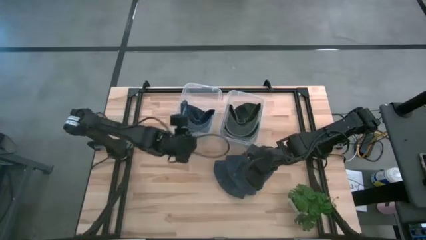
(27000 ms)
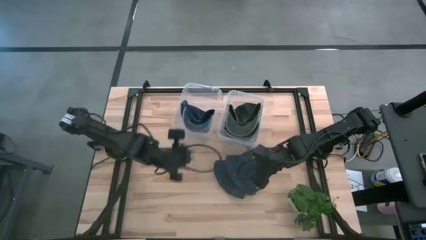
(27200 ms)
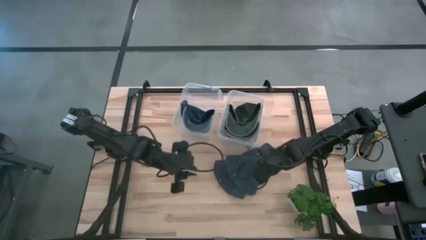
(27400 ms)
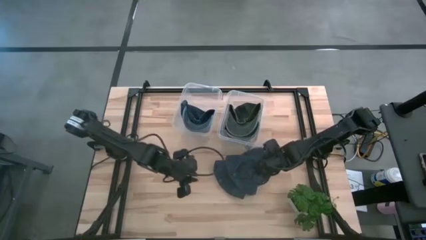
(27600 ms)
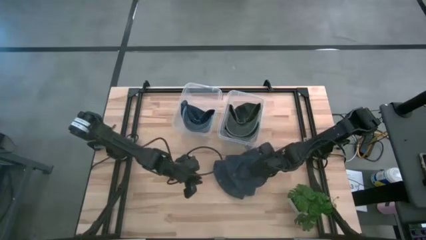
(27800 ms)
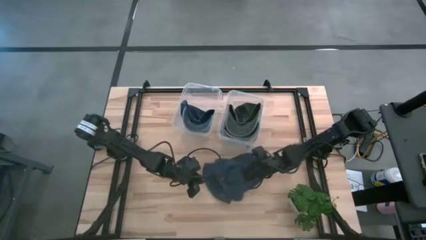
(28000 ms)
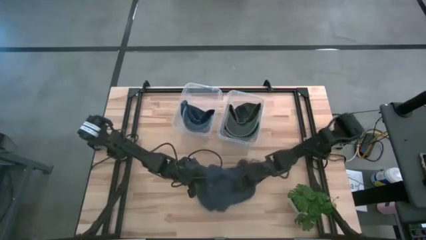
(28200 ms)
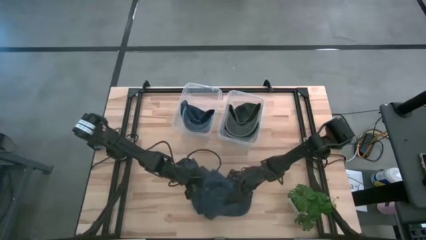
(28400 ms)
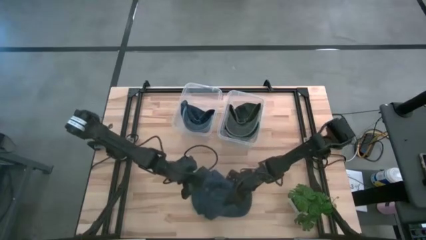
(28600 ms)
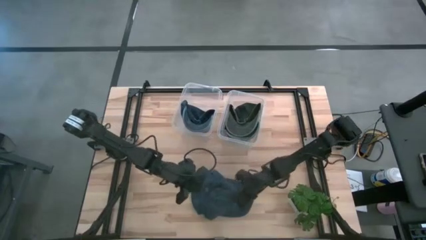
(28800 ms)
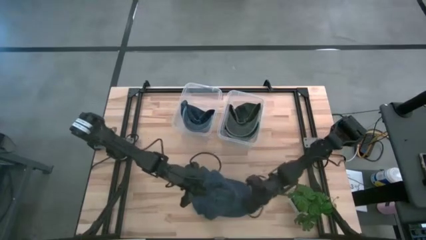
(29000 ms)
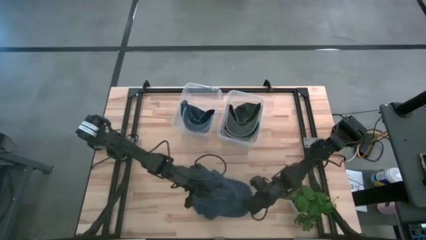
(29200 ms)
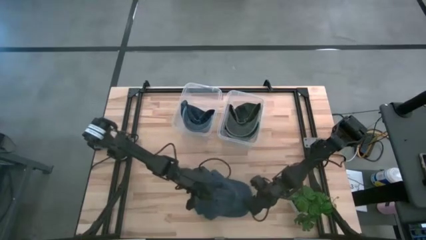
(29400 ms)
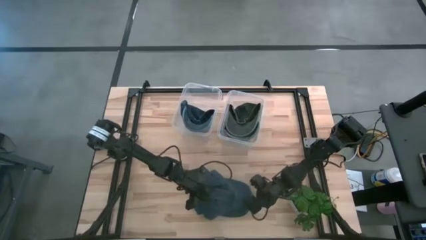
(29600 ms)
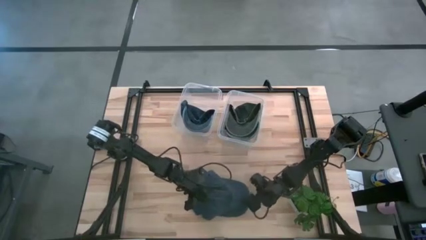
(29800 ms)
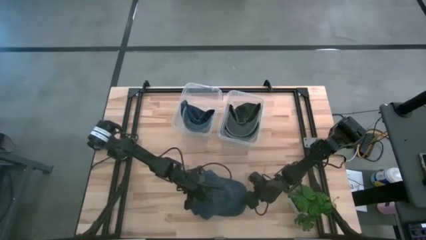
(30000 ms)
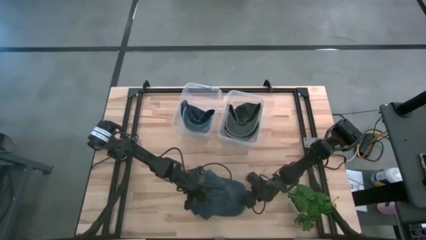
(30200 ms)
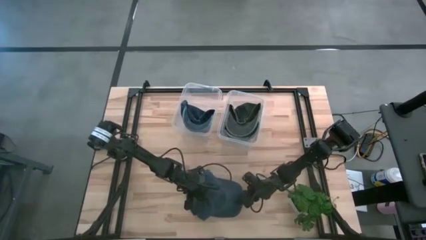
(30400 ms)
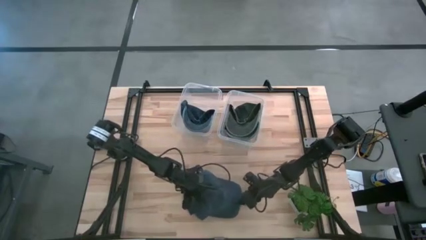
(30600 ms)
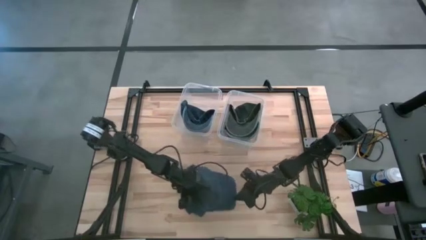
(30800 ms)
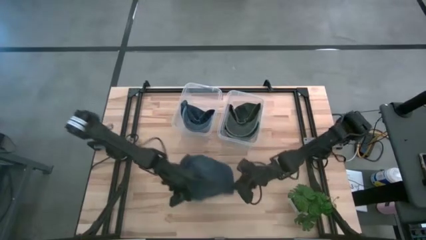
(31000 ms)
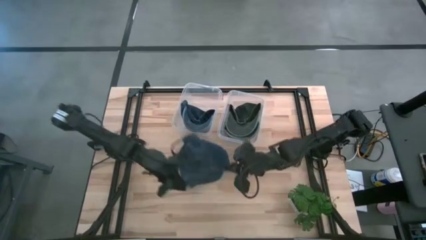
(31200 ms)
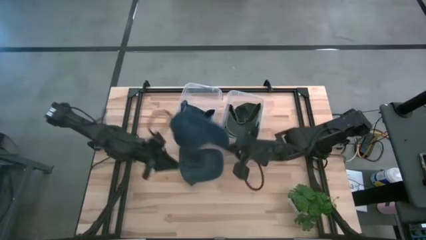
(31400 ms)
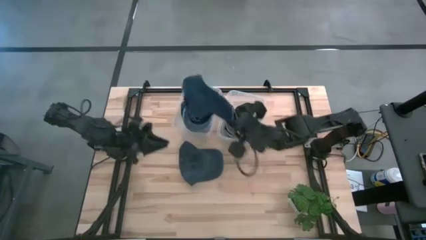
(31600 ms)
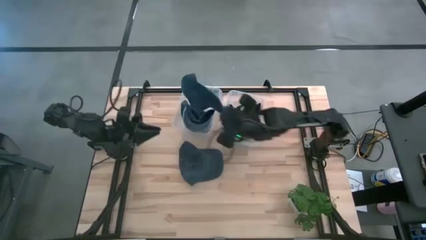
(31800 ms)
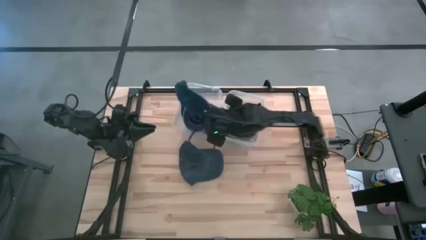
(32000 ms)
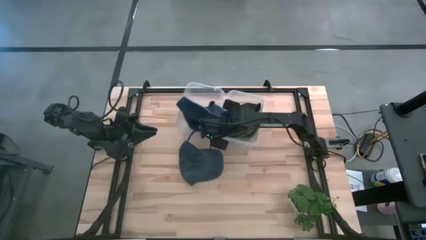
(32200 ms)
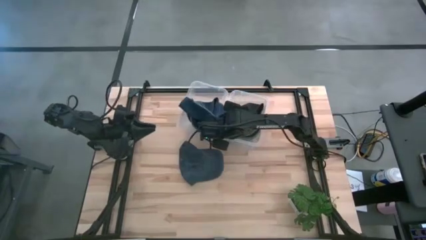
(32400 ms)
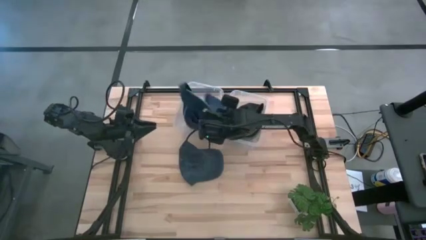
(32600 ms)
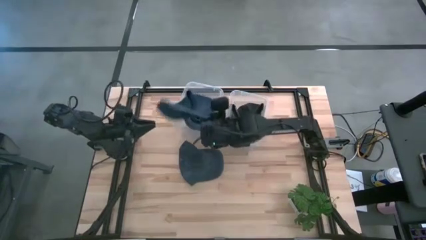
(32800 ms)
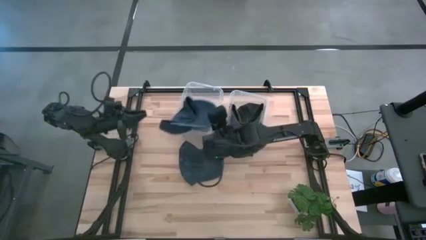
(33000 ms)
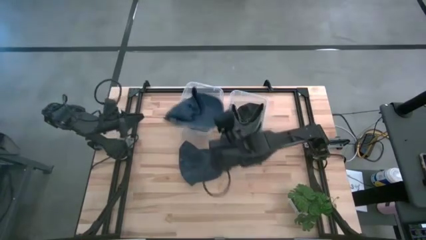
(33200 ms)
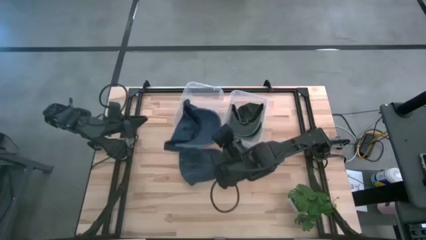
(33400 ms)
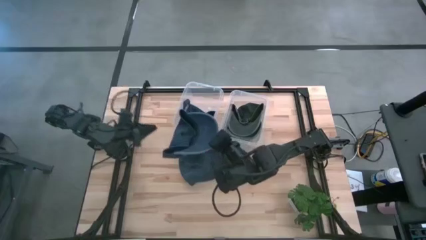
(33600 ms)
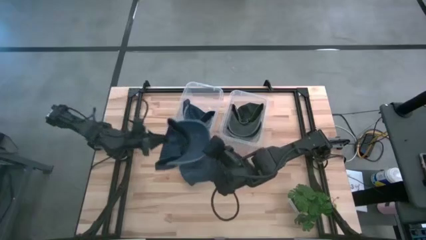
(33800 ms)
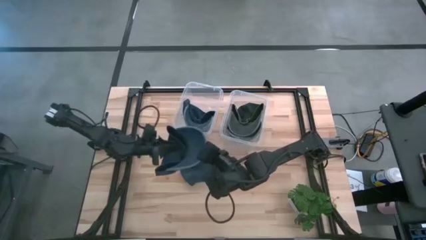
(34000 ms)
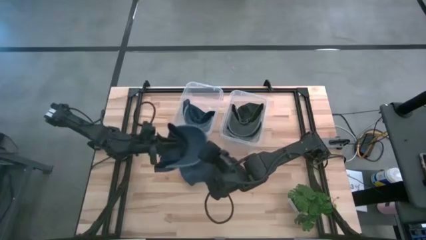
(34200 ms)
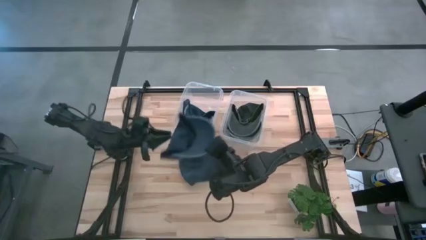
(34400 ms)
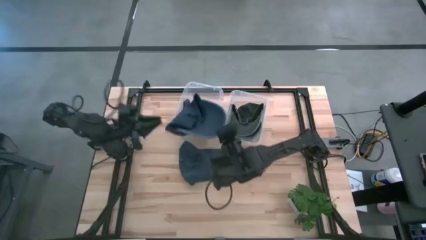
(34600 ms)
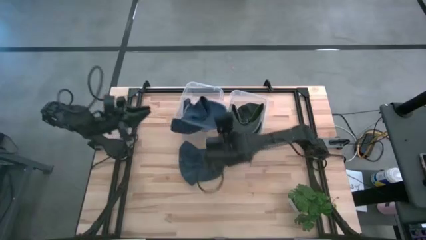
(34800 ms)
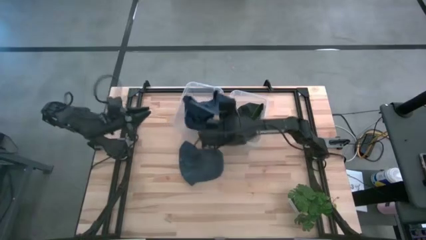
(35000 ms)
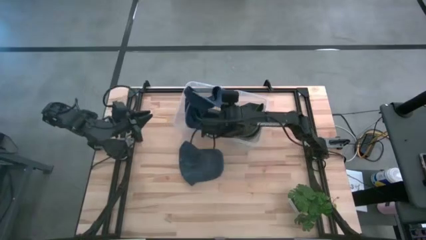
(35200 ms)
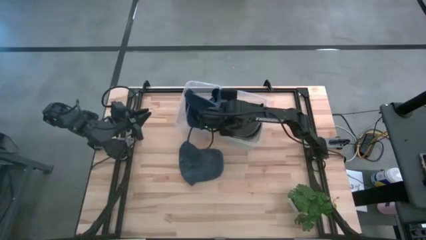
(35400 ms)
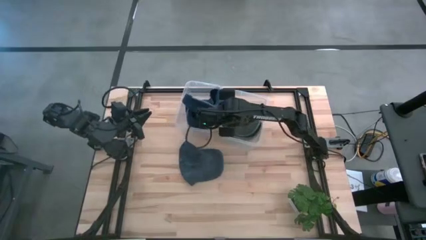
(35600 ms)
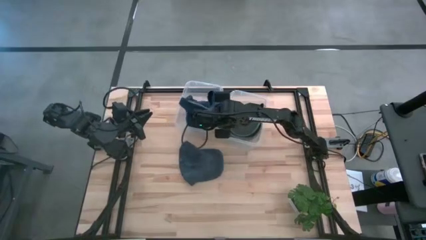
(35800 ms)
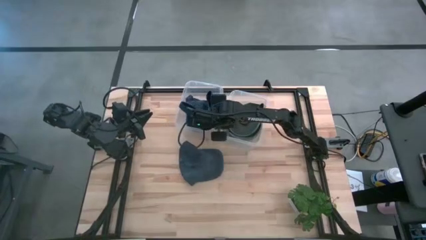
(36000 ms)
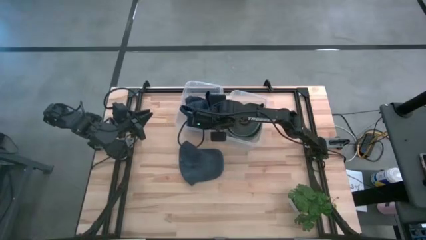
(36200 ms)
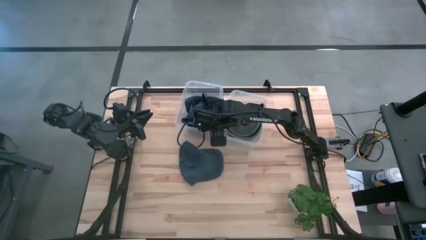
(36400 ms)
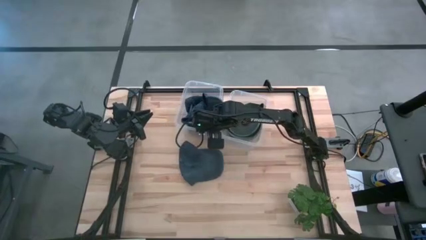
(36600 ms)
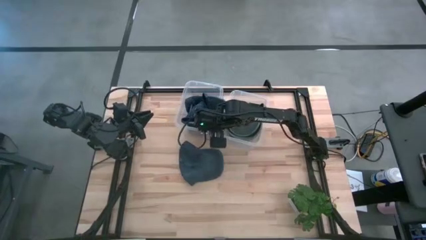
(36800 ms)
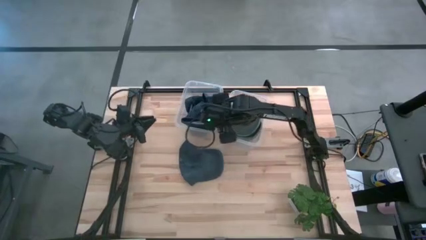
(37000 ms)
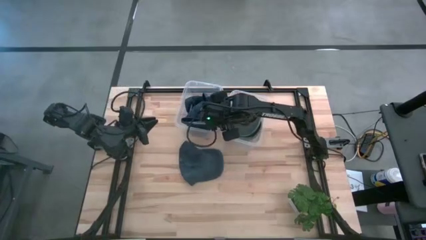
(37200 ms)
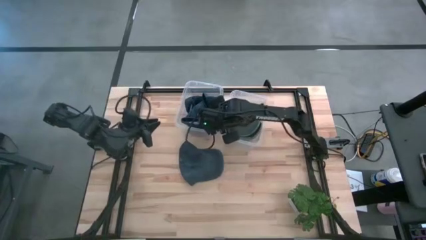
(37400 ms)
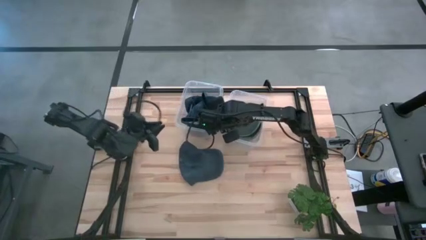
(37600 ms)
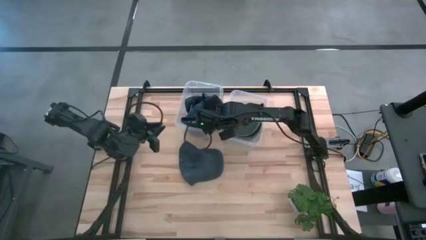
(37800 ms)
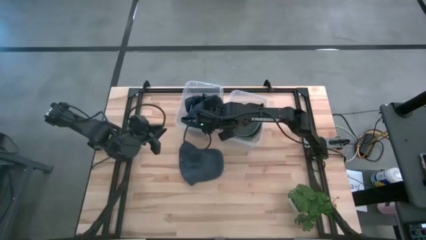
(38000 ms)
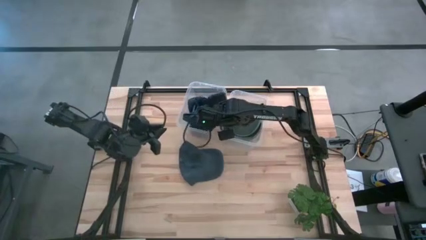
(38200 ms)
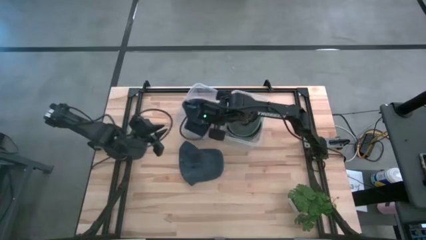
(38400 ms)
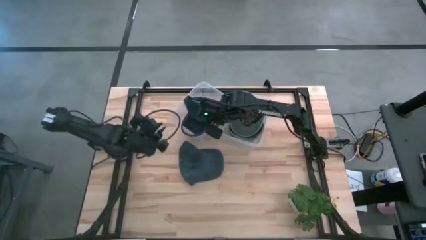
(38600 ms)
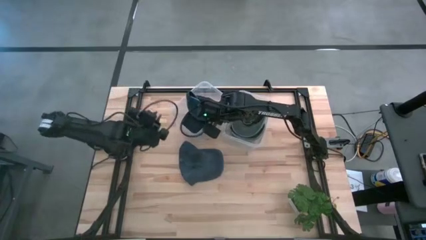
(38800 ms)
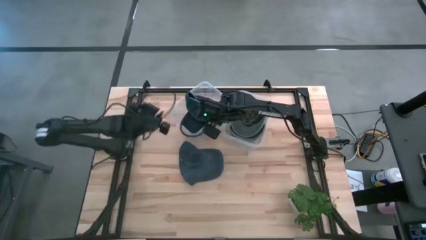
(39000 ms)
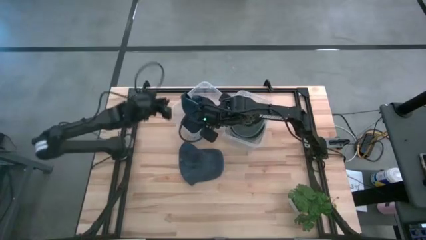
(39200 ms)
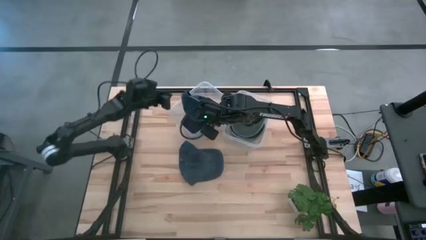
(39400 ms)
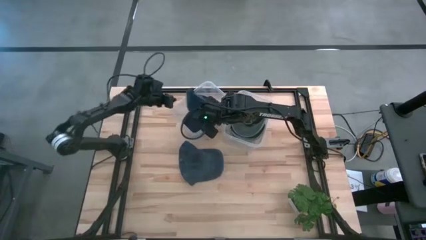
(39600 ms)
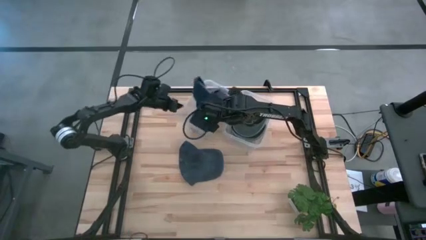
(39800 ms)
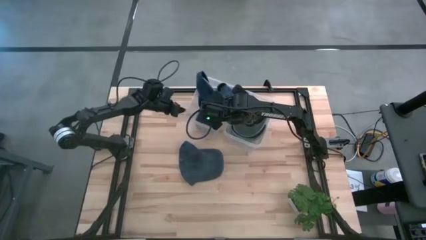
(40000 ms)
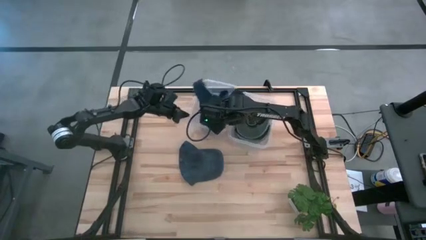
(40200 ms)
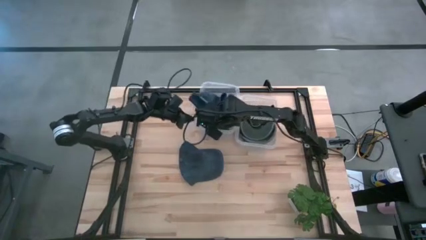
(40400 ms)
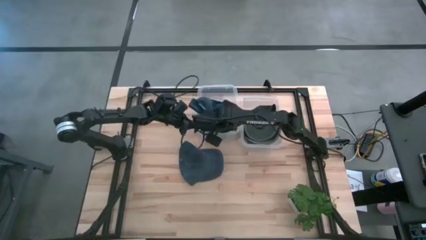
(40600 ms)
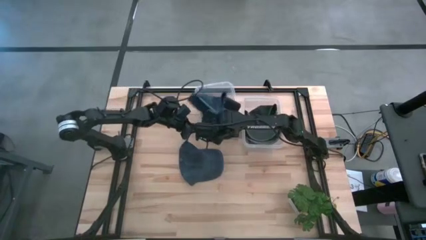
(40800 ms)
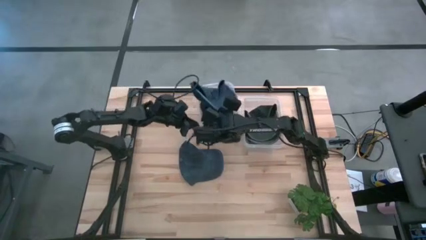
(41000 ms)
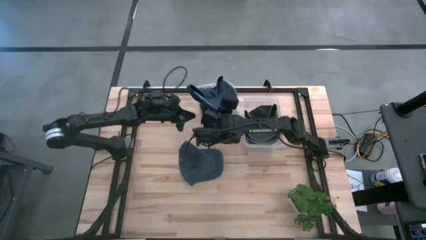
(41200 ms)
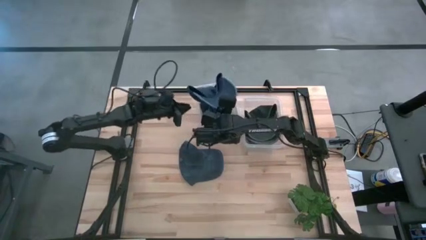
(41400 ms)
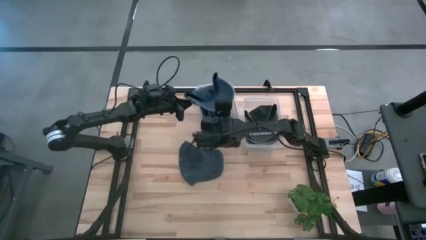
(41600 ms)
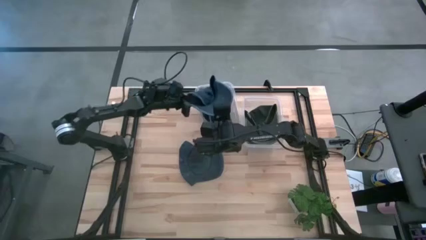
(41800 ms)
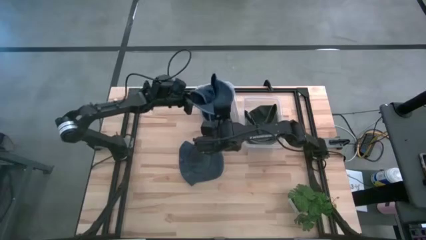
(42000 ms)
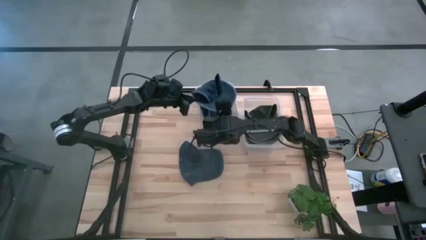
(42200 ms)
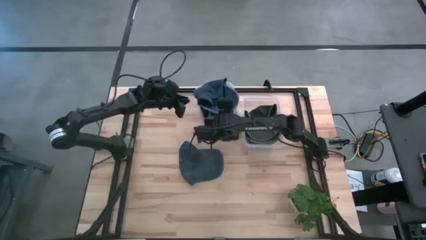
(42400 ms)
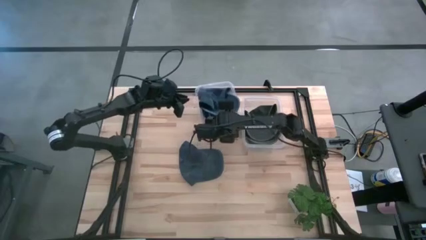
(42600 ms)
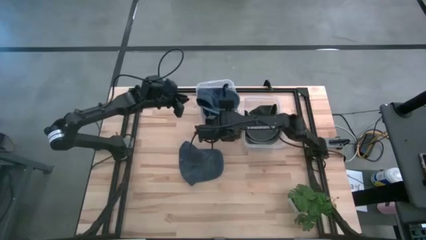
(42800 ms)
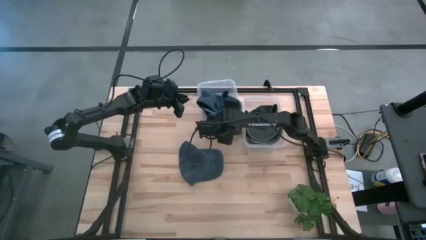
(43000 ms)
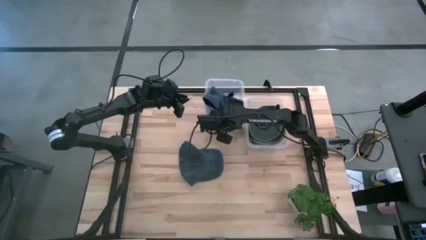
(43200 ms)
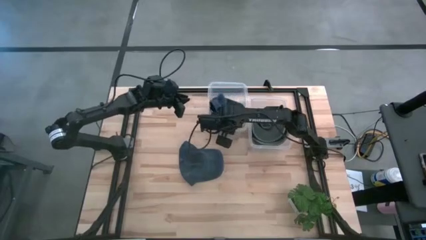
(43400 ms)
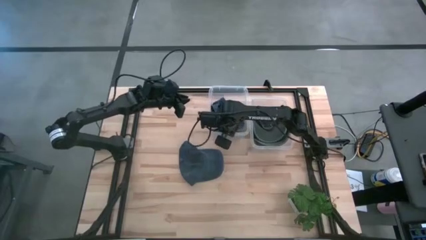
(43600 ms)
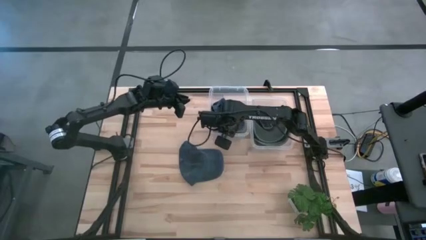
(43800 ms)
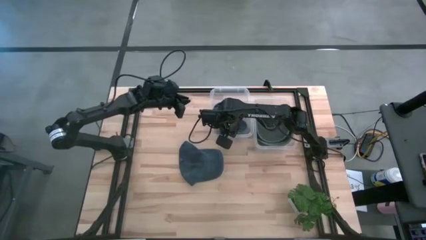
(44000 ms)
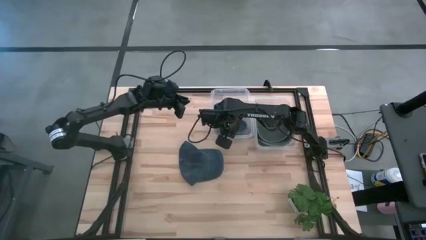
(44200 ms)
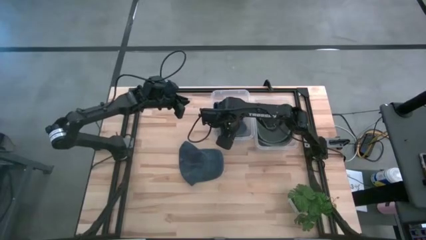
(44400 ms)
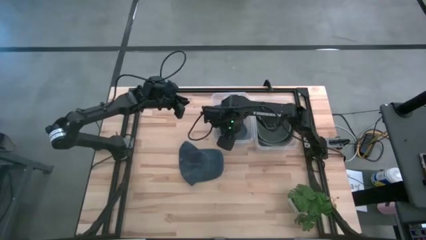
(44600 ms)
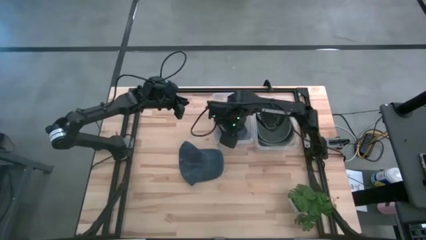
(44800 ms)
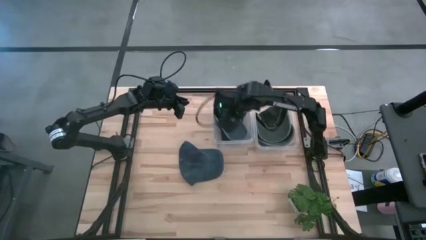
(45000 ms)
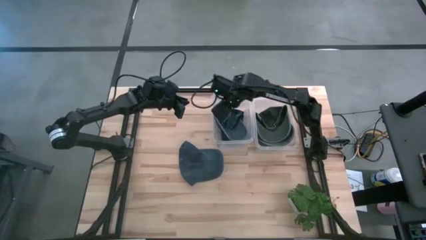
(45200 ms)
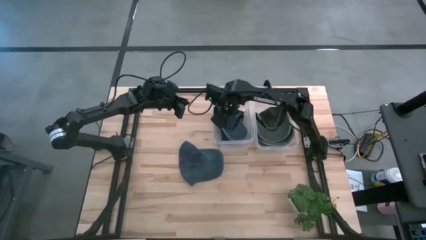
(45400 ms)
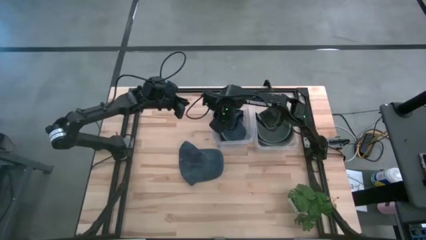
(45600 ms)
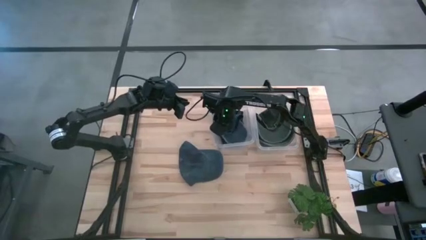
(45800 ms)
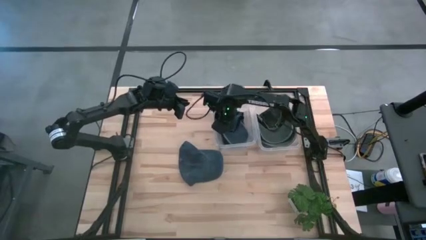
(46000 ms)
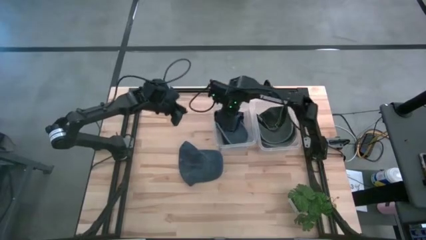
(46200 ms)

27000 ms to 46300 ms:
Task: Pick & Place hat
Put the right blue cap into the left transparent bin
